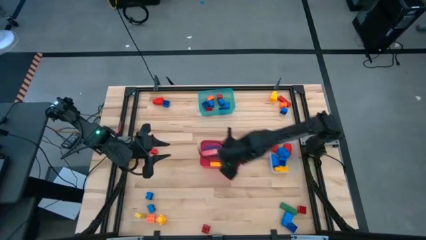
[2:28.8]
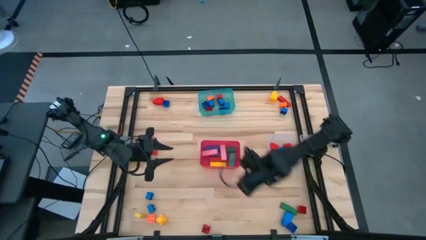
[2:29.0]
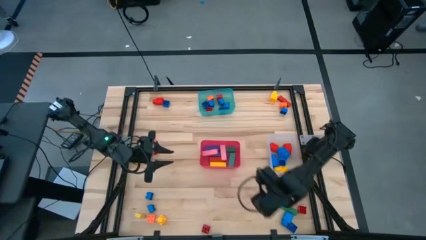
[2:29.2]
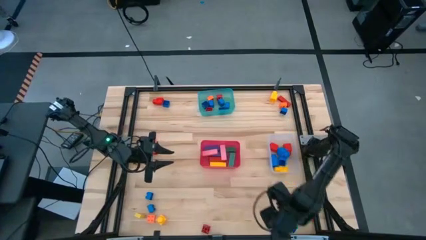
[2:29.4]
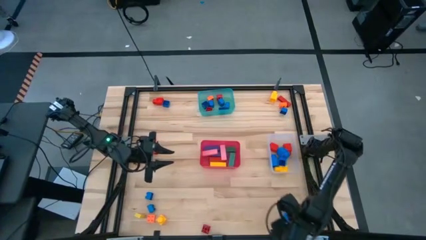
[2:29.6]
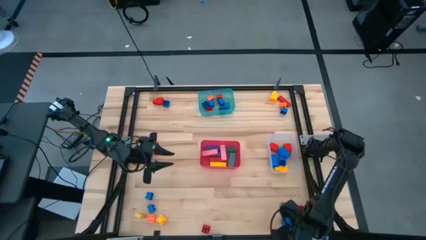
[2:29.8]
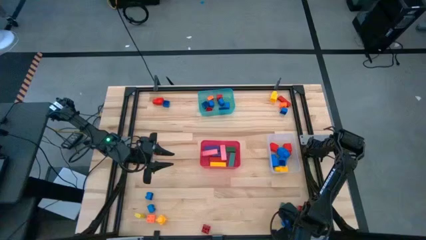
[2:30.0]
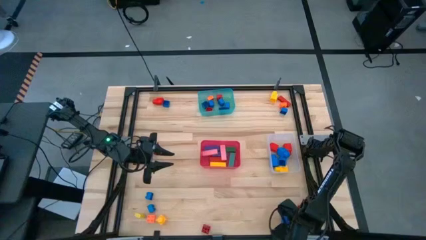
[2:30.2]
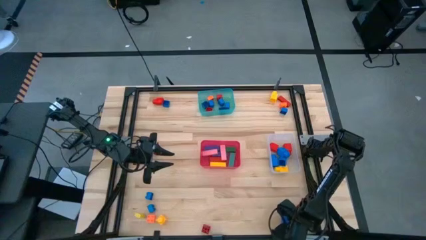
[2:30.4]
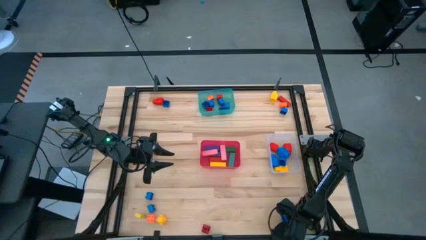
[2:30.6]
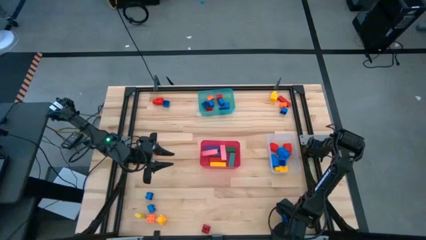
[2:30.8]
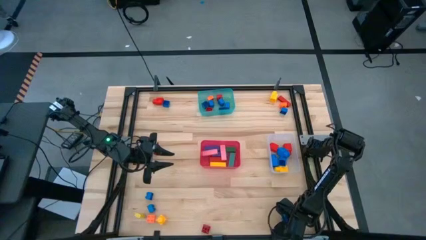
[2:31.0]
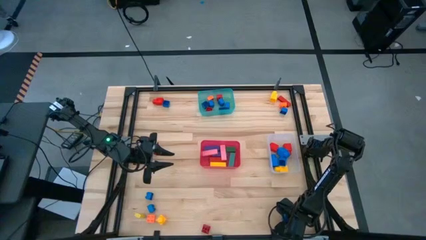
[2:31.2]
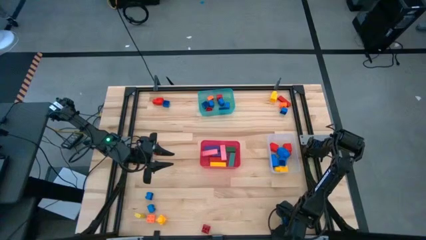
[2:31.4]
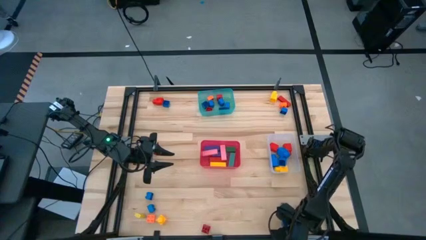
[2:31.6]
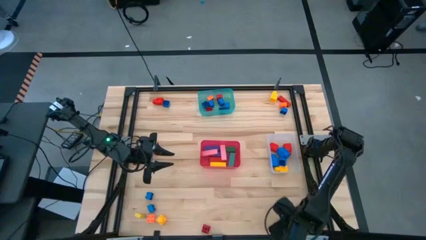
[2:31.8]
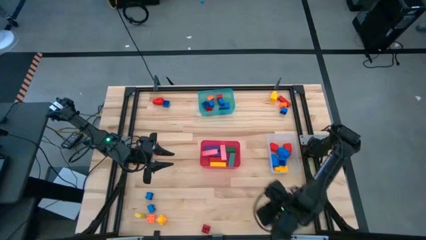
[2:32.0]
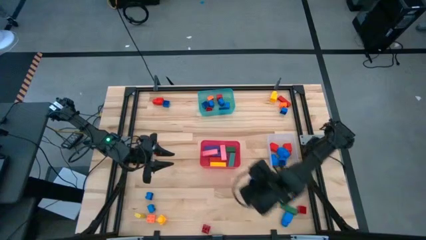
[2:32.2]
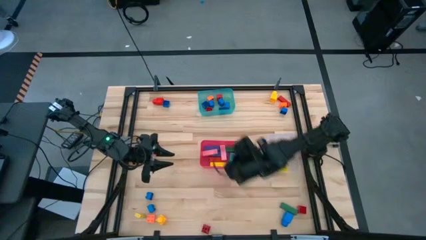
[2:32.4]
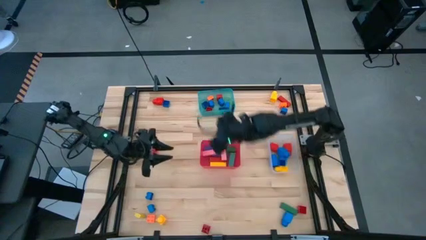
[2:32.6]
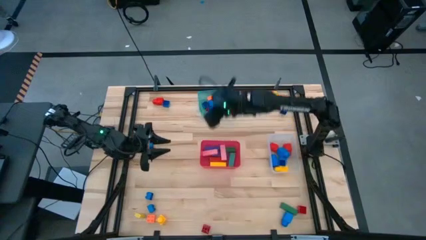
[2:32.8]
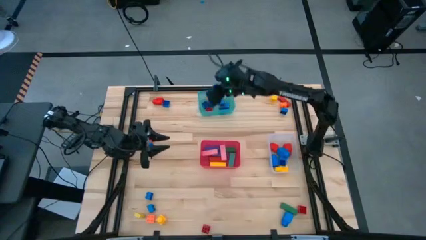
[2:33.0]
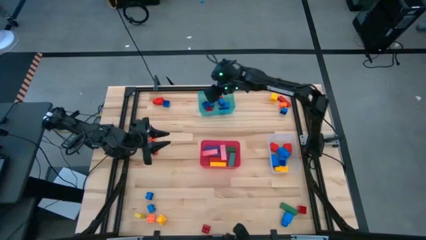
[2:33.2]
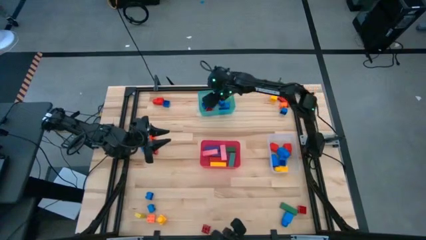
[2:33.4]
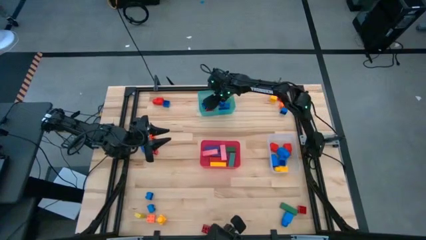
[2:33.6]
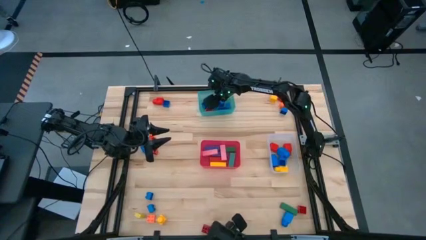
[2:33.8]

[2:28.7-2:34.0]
Task: Sort blocks by size
Put the blue 4 stud game piece into the blue bin

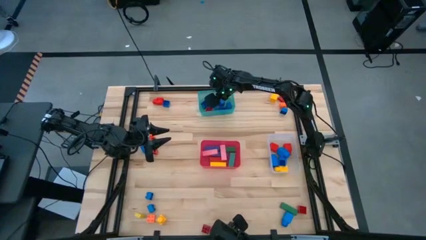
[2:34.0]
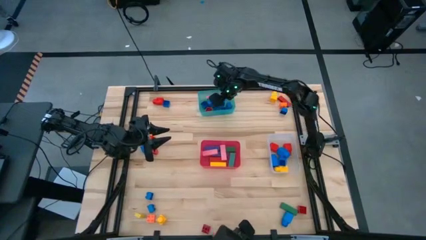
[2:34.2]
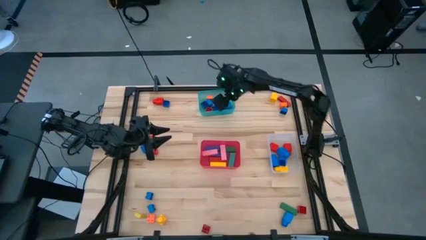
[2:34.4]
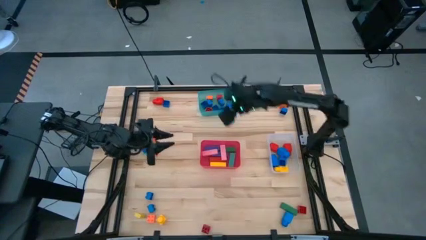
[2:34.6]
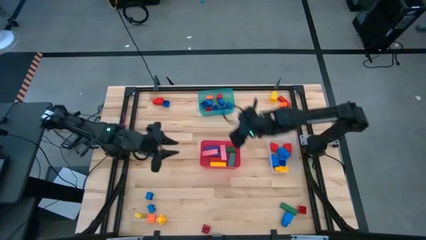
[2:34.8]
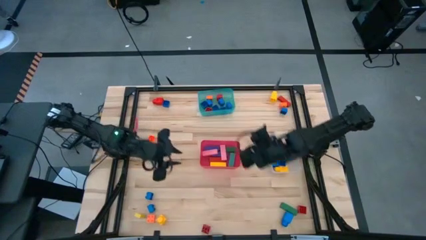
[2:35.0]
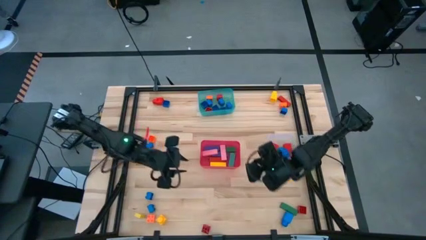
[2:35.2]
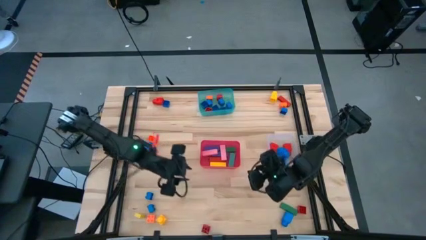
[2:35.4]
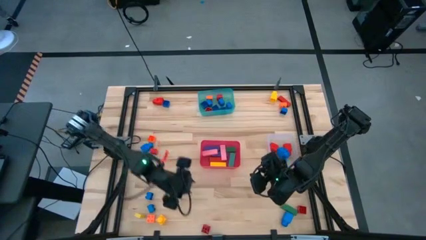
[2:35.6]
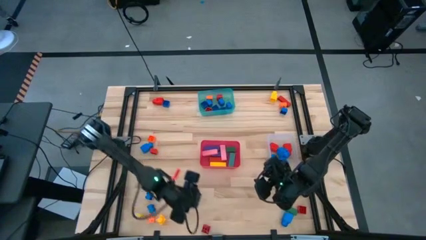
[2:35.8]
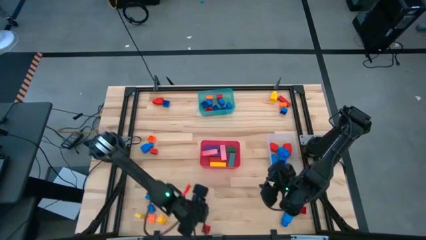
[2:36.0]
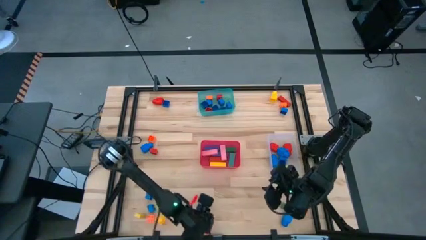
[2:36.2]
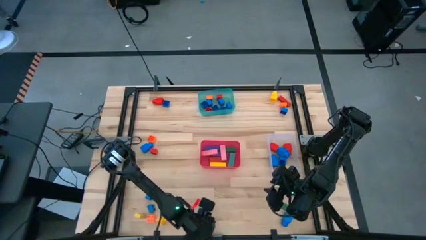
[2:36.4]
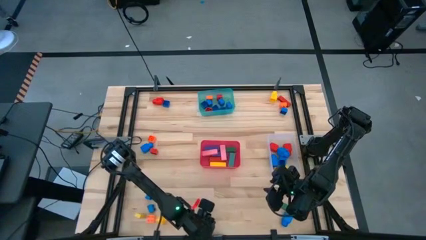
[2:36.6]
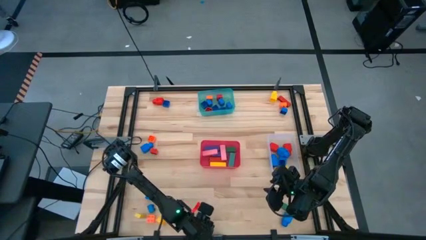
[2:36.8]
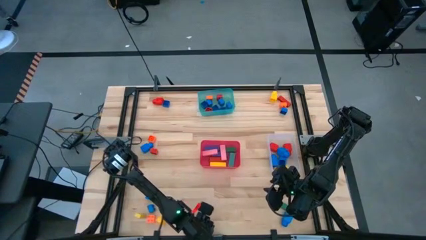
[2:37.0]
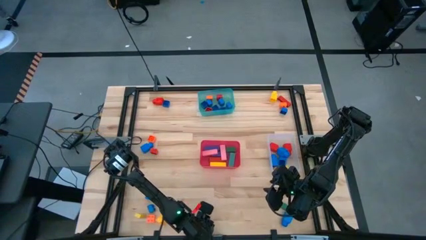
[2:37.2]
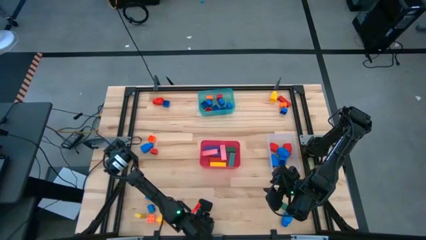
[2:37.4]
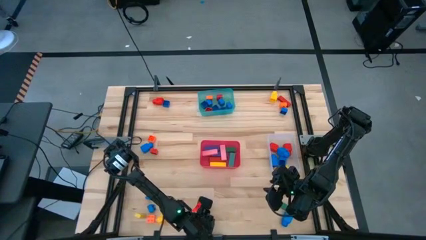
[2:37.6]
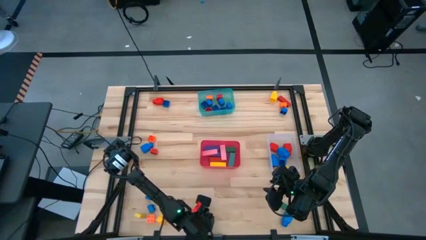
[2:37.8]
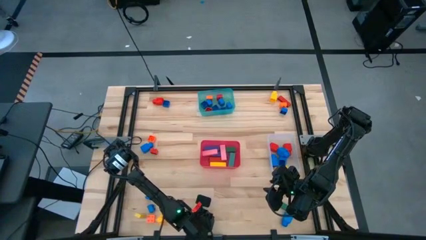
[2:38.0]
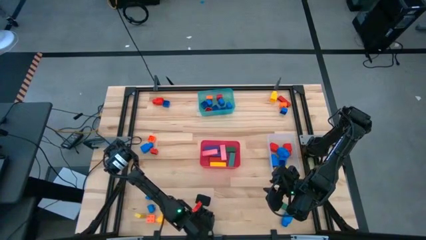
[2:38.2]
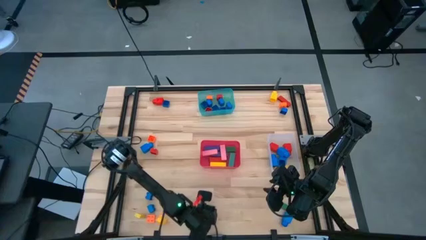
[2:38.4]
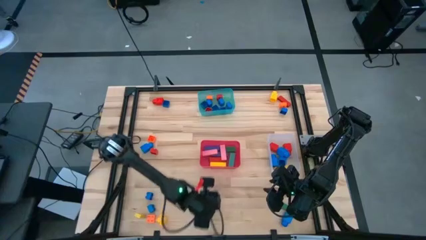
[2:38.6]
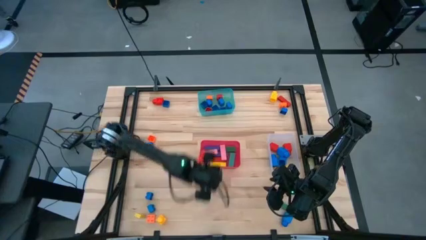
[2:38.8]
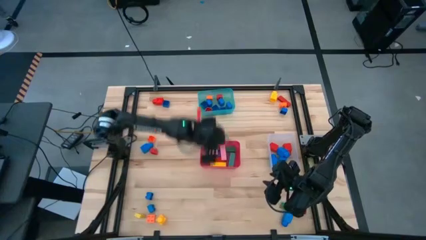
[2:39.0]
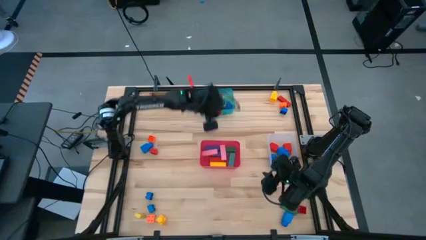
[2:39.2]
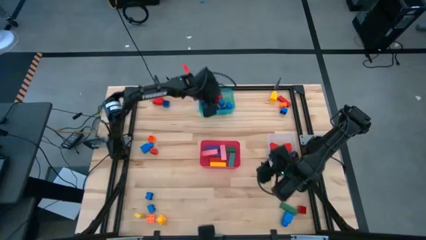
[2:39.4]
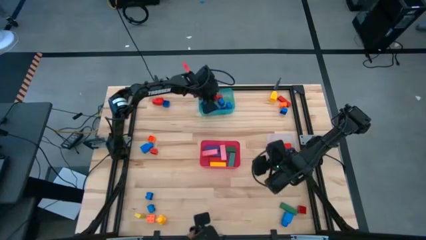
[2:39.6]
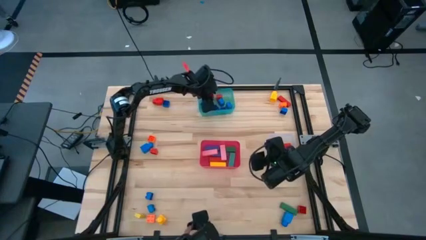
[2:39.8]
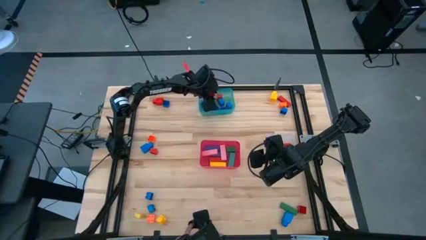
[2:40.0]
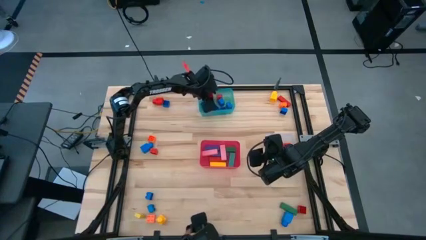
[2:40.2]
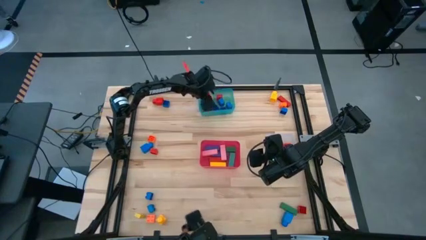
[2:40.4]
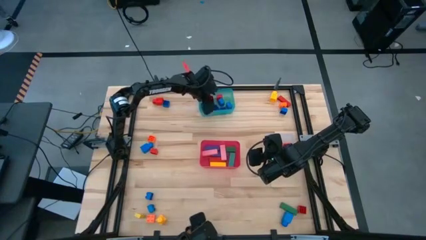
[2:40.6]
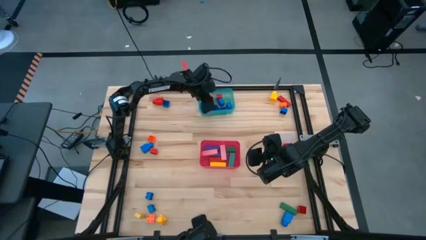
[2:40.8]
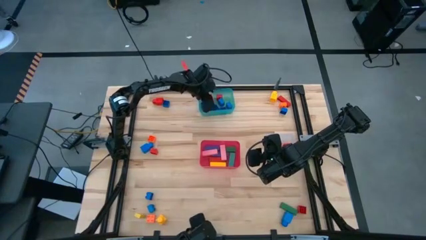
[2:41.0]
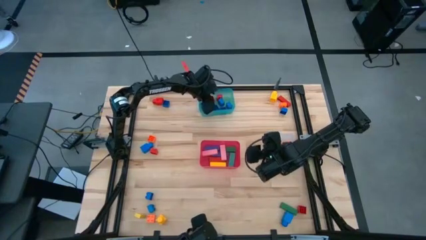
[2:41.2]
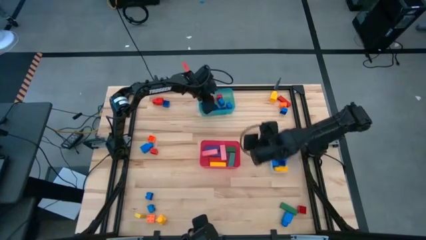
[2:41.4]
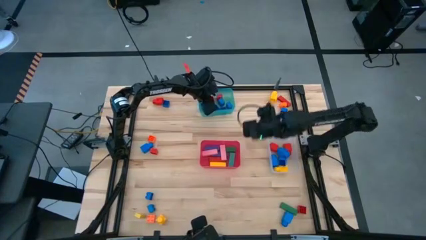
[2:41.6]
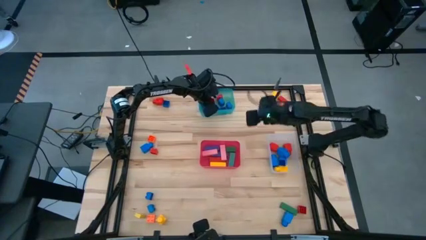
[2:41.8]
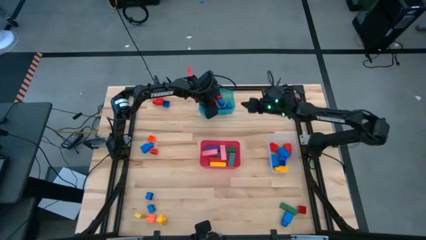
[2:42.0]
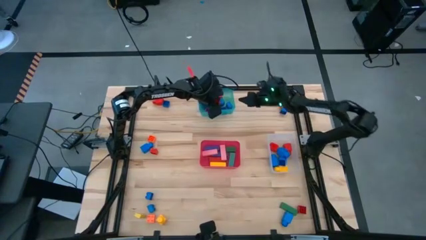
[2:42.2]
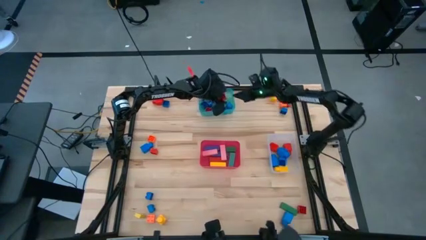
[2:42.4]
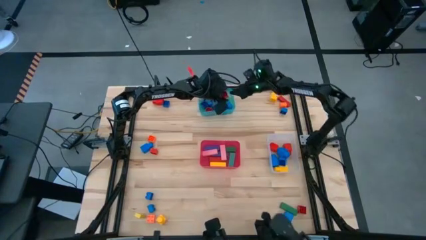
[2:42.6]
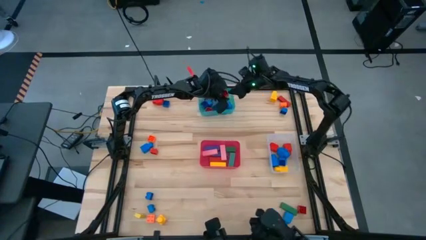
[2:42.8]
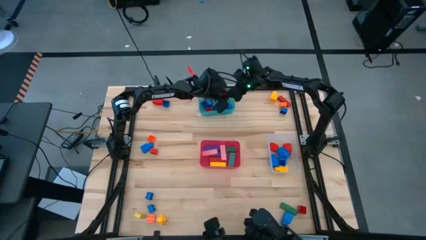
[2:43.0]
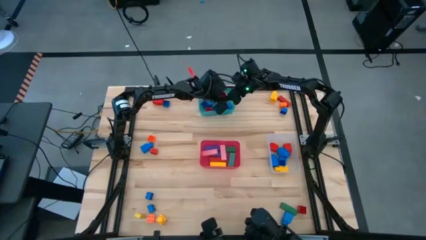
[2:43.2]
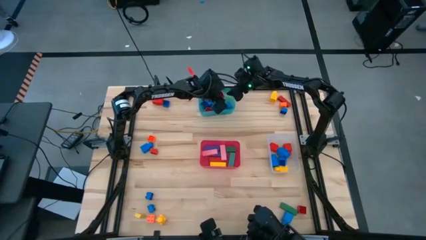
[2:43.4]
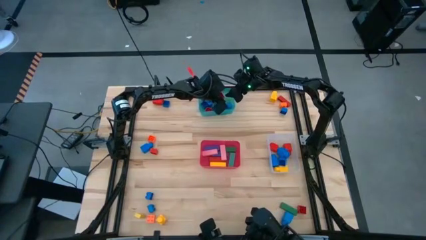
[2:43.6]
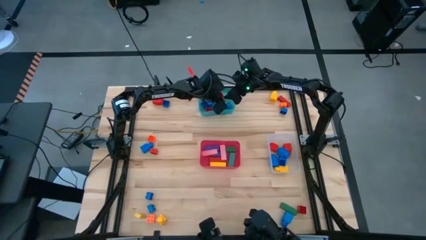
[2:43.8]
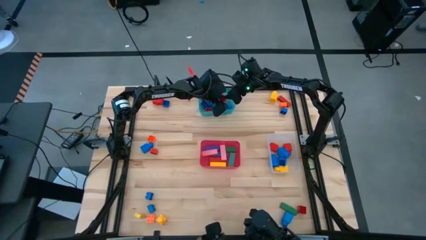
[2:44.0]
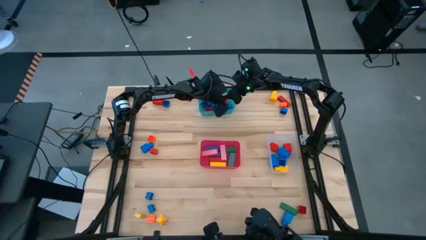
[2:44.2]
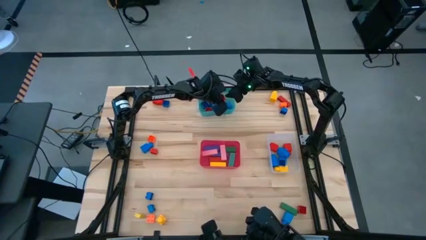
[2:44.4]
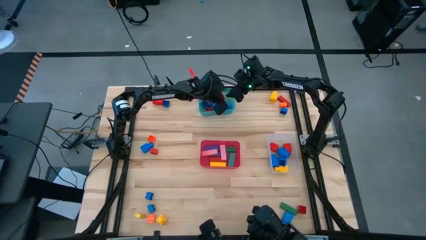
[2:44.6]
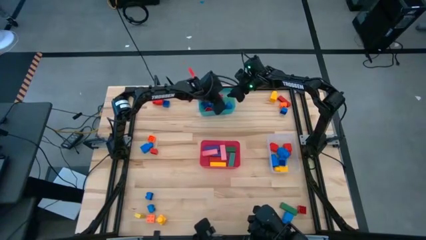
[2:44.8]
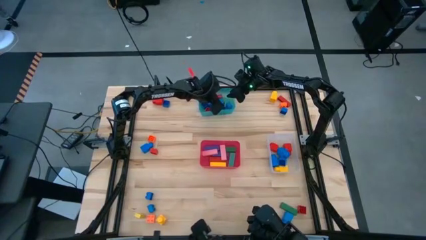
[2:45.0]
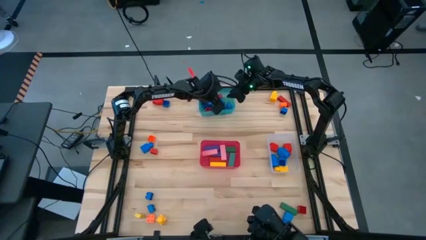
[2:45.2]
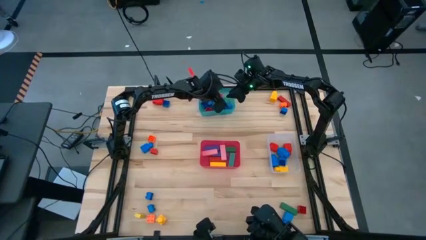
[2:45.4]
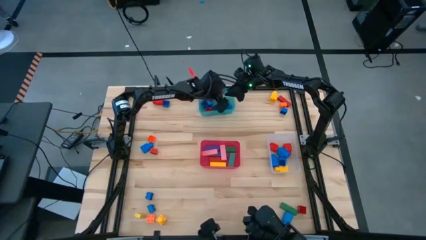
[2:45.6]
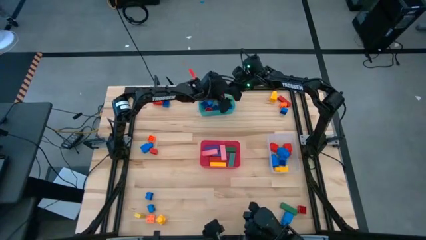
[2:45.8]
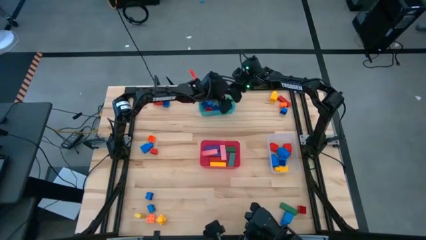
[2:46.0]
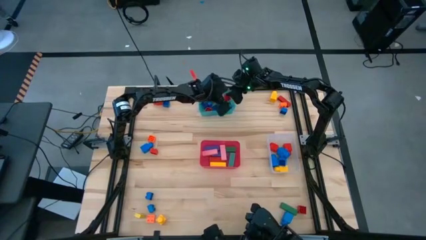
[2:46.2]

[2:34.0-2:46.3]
Put the red 4 stud game piece into the blue bin
